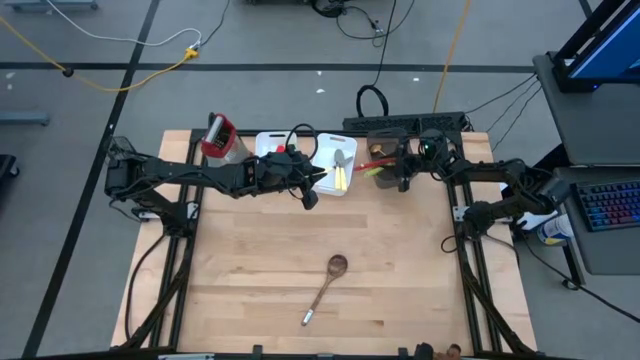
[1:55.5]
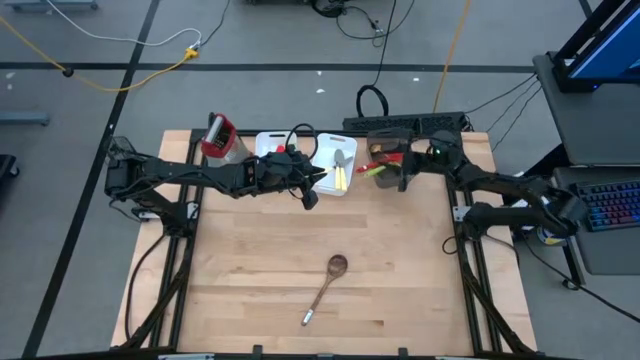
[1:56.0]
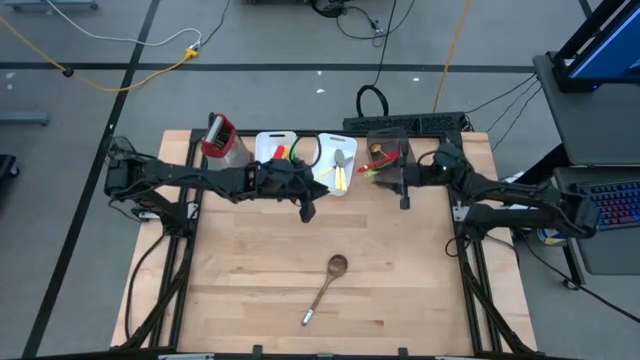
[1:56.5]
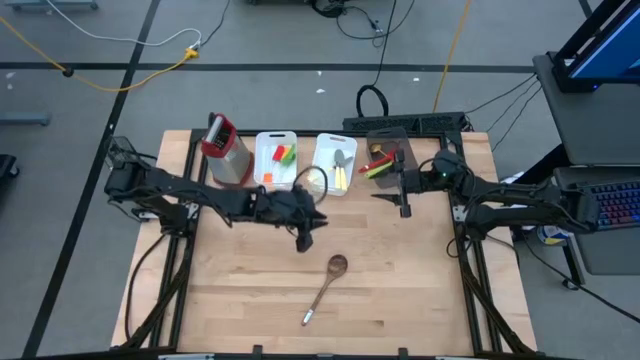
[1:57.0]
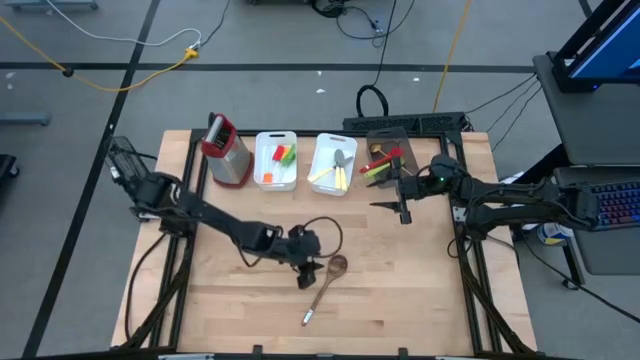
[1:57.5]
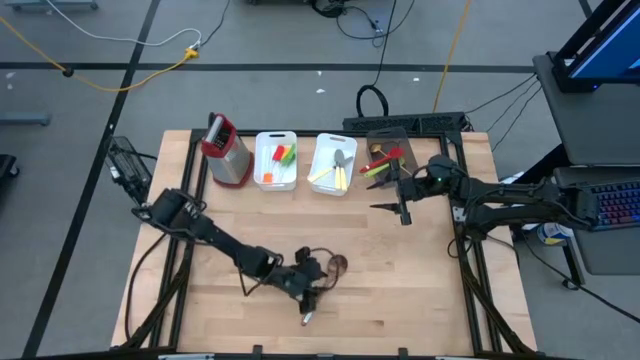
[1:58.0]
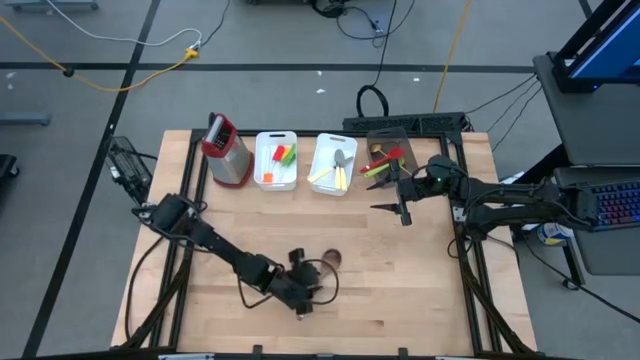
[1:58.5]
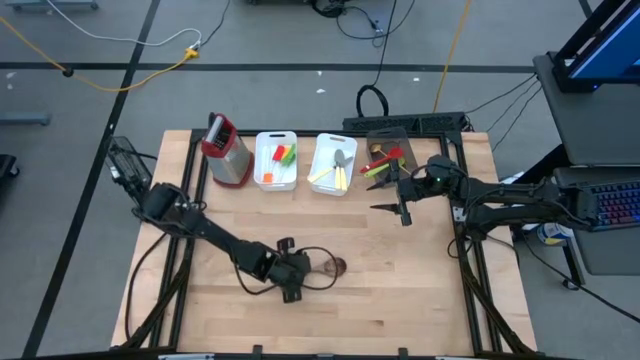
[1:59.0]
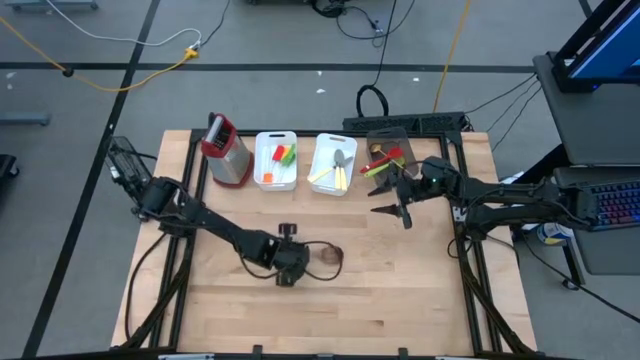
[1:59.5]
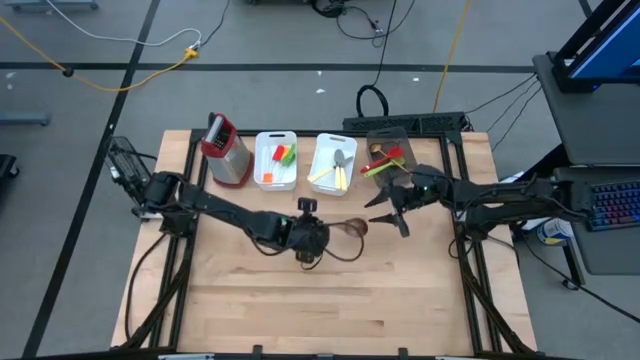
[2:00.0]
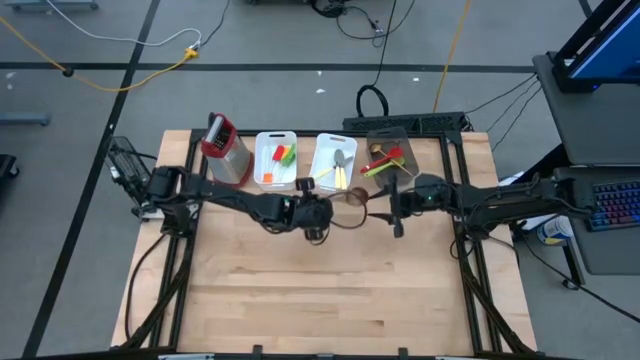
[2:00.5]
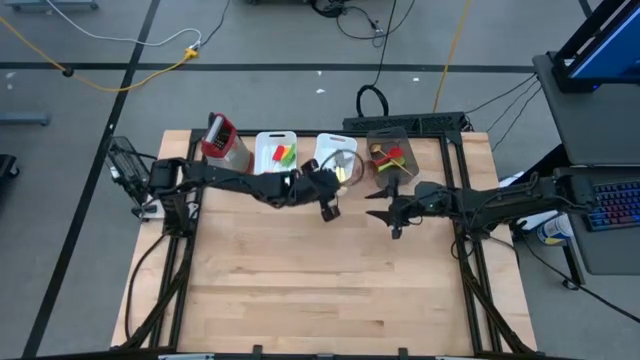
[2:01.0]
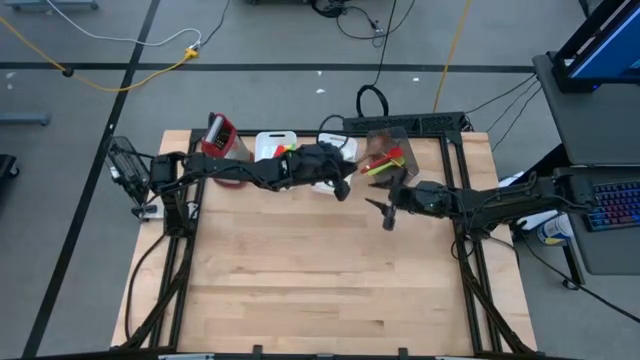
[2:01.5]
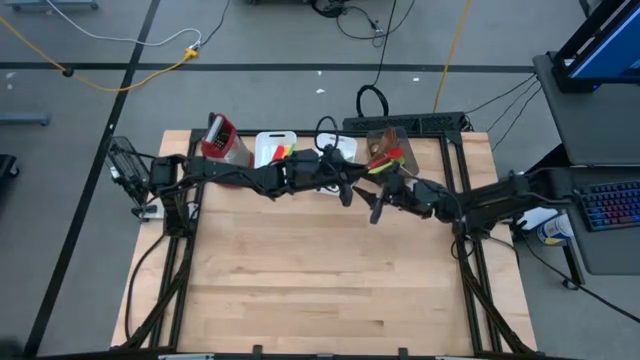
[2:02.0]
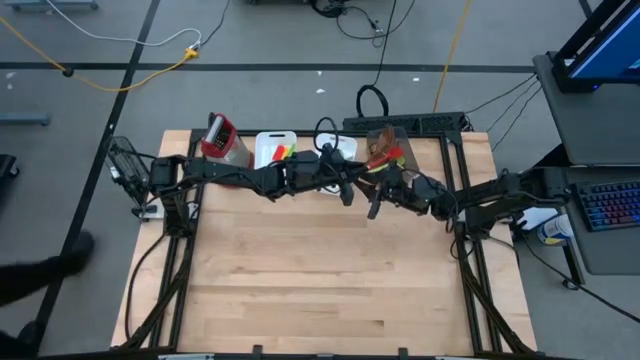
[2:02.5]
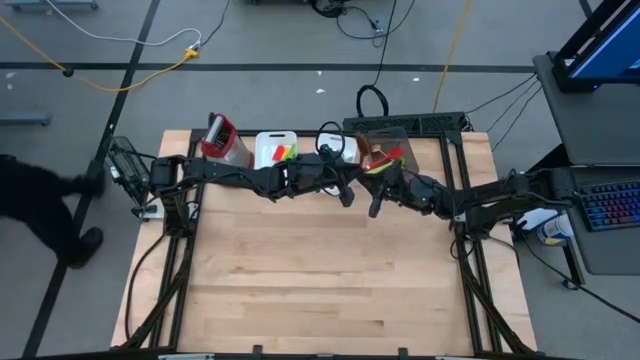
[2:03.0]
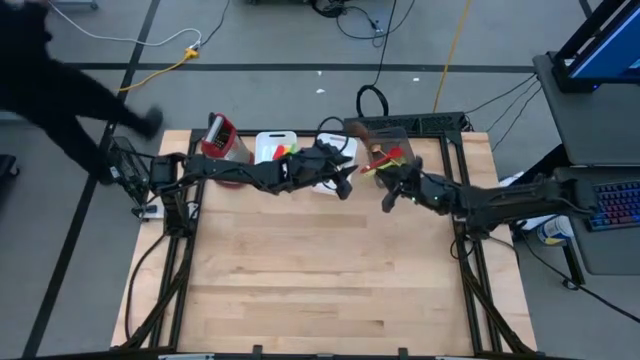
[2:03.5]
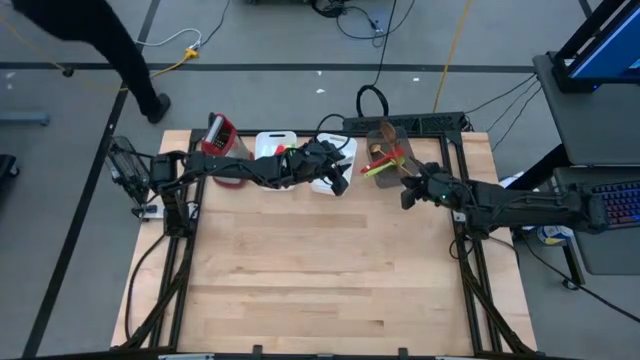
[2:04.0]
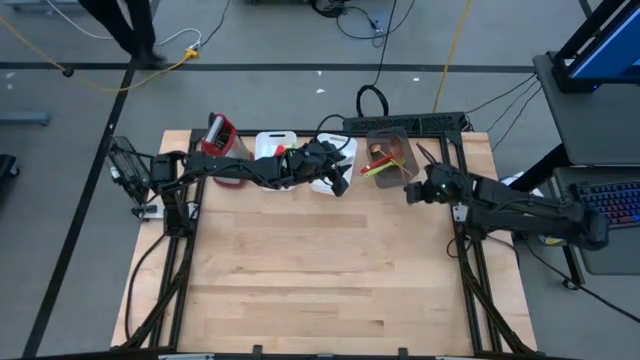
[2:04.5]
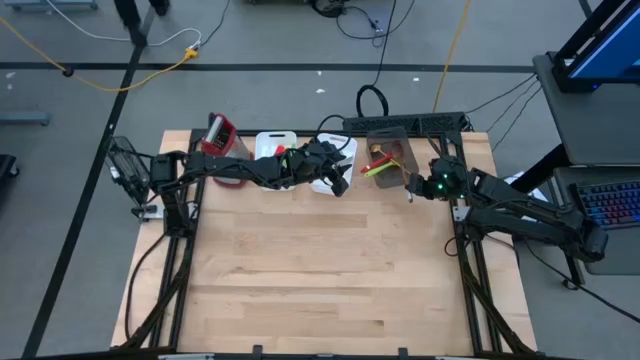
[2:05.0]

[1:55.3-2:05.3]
Task: Pick & Place Kitchen Items
Put the brown serving spoon into the black bin

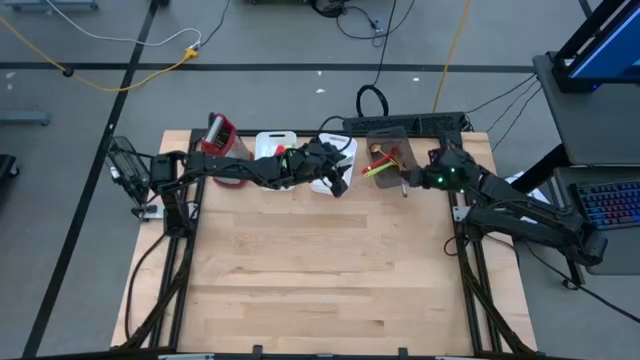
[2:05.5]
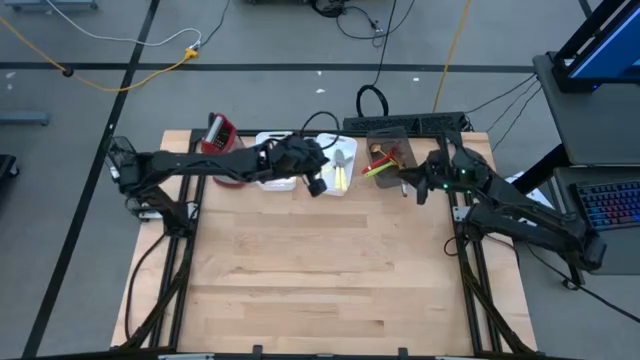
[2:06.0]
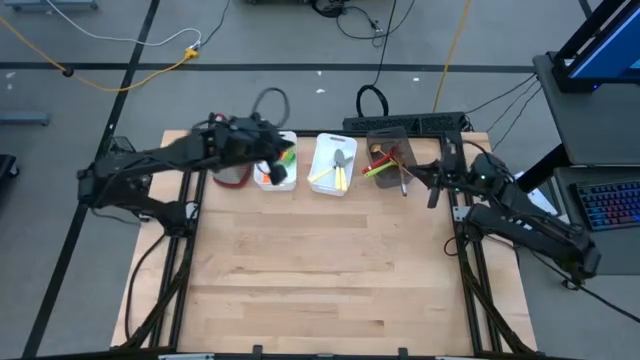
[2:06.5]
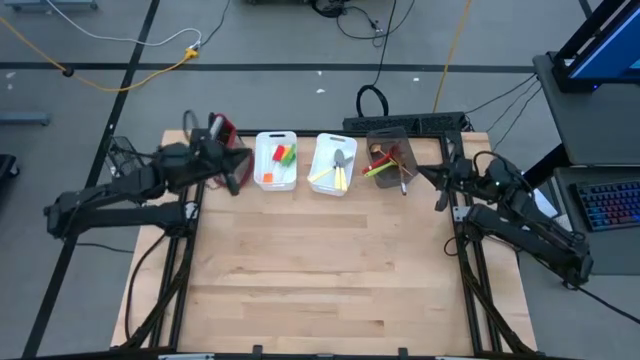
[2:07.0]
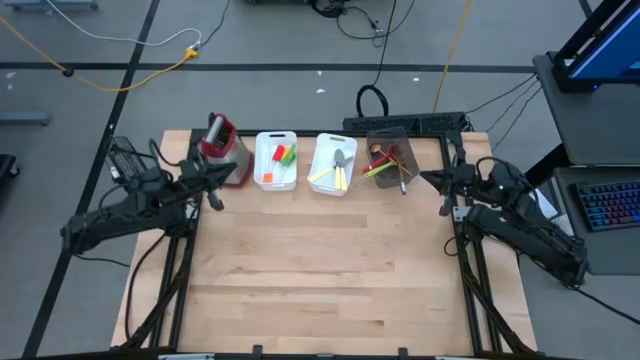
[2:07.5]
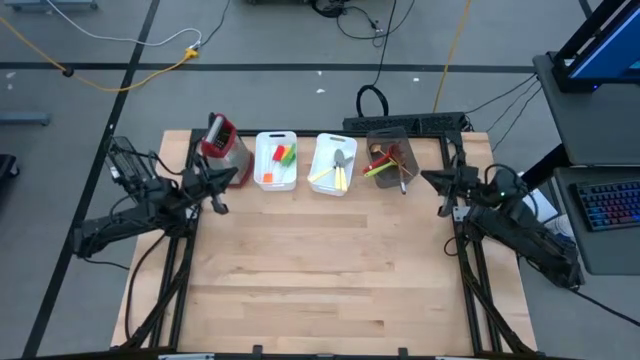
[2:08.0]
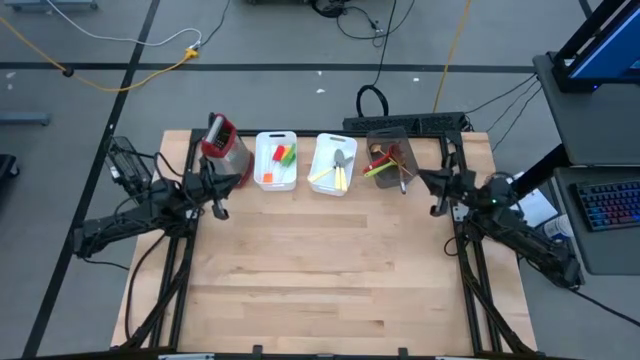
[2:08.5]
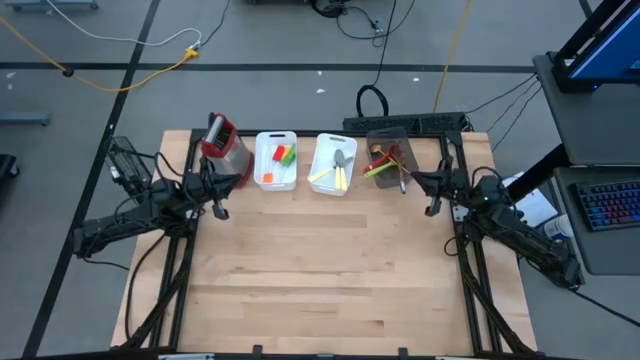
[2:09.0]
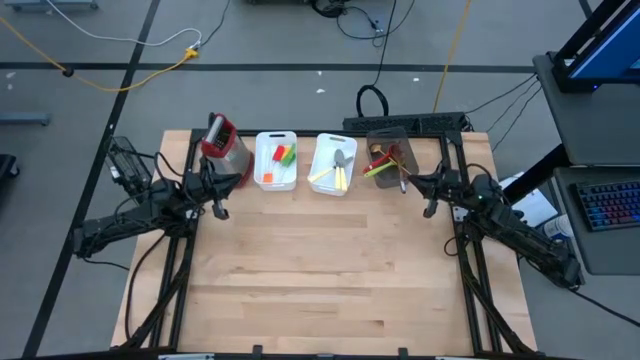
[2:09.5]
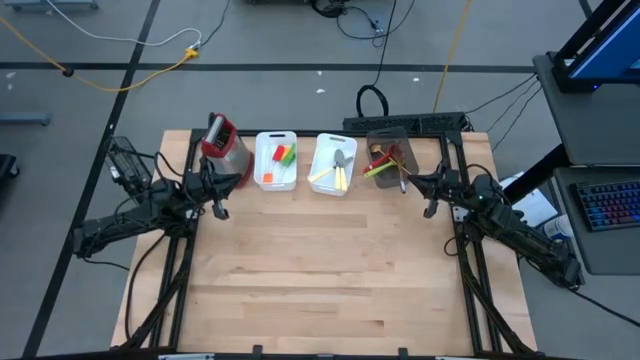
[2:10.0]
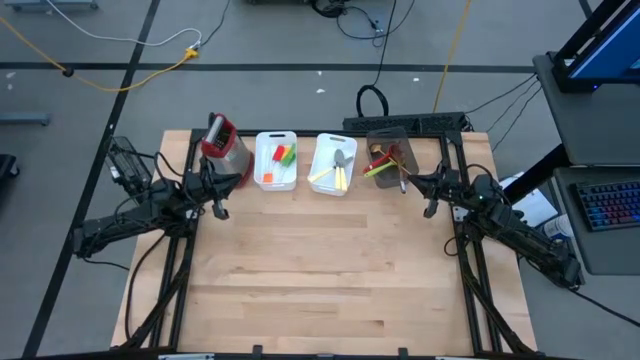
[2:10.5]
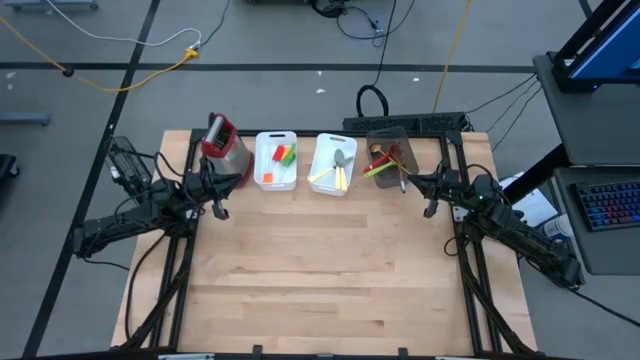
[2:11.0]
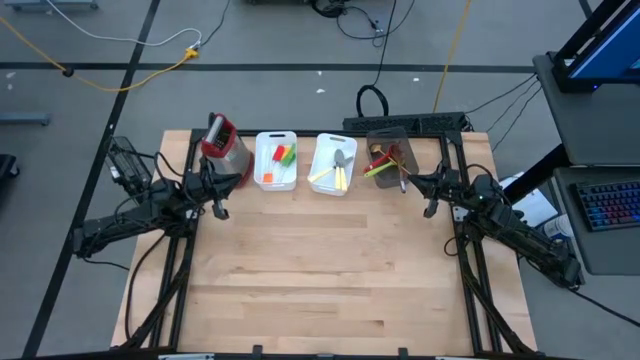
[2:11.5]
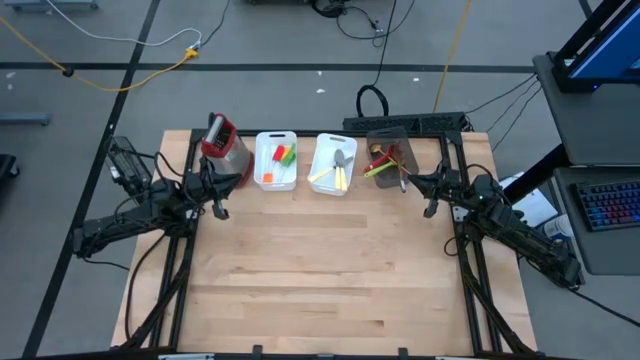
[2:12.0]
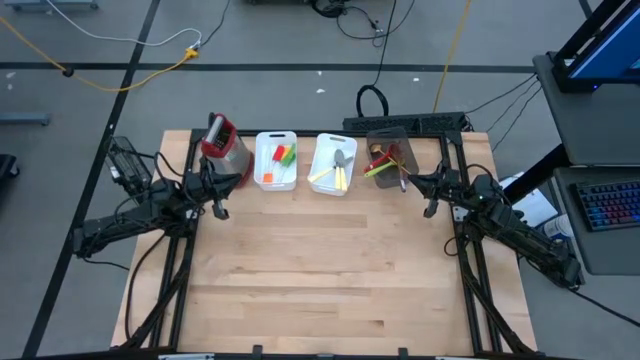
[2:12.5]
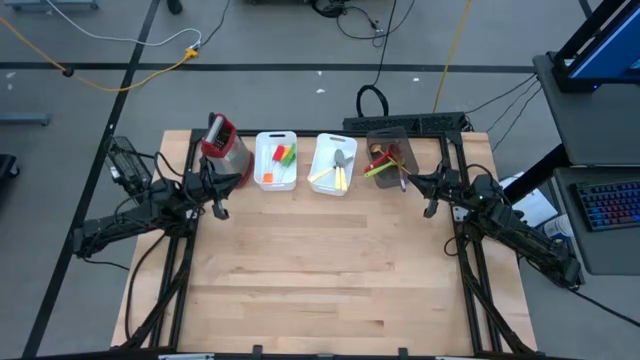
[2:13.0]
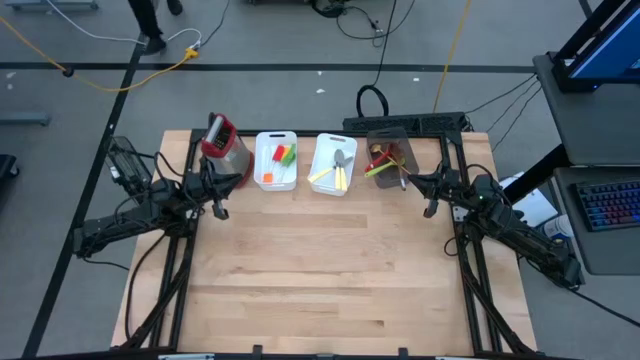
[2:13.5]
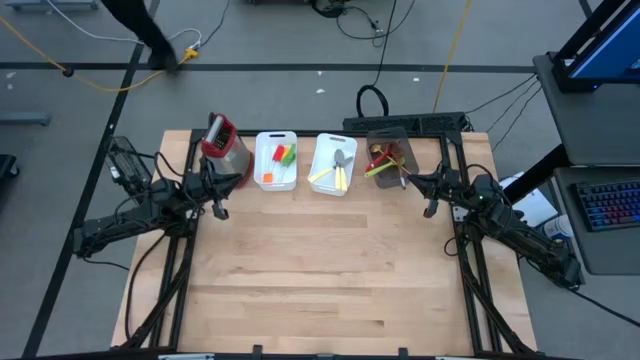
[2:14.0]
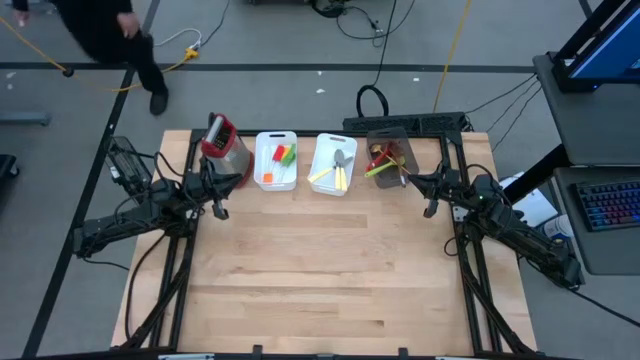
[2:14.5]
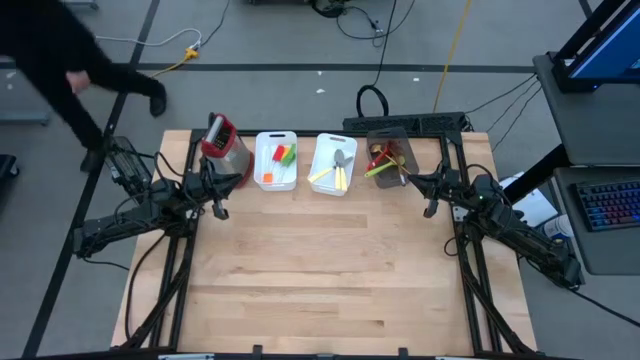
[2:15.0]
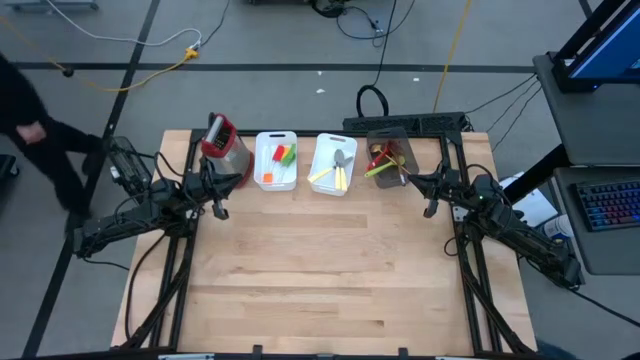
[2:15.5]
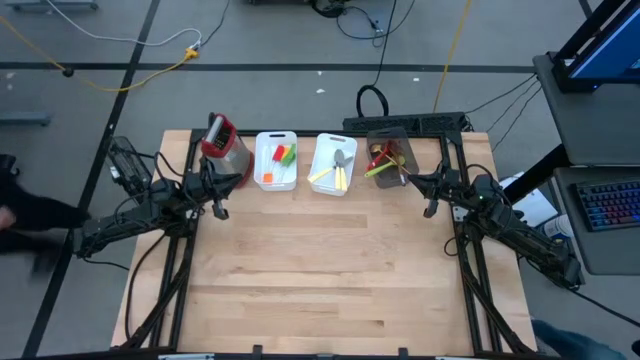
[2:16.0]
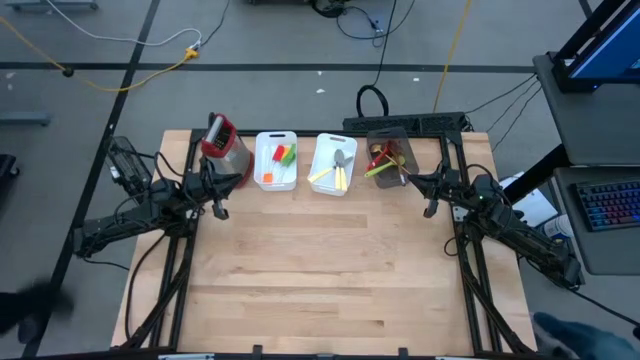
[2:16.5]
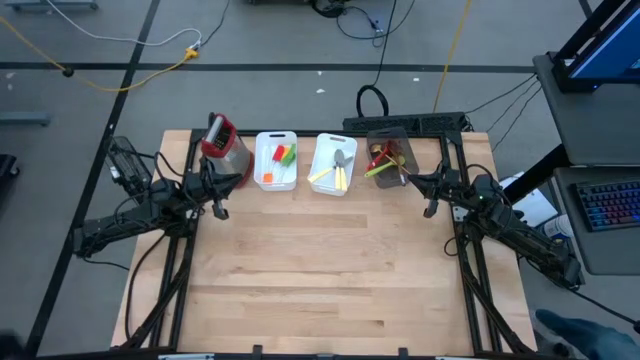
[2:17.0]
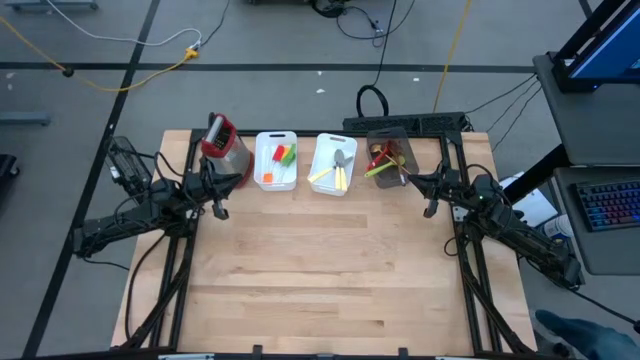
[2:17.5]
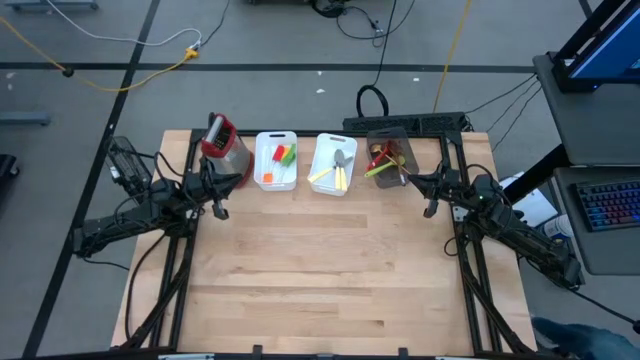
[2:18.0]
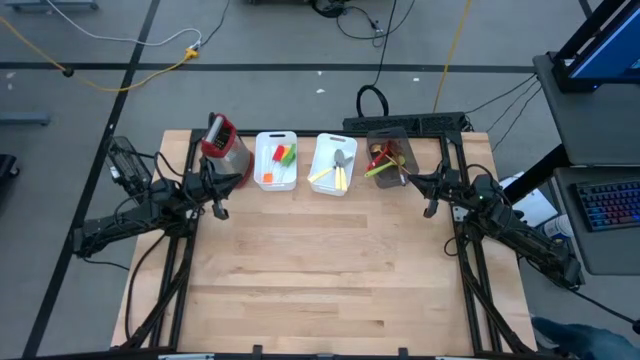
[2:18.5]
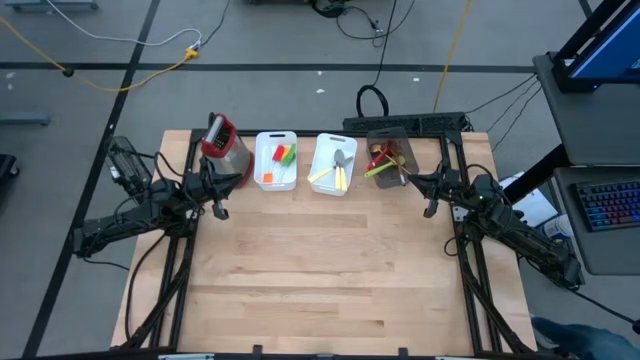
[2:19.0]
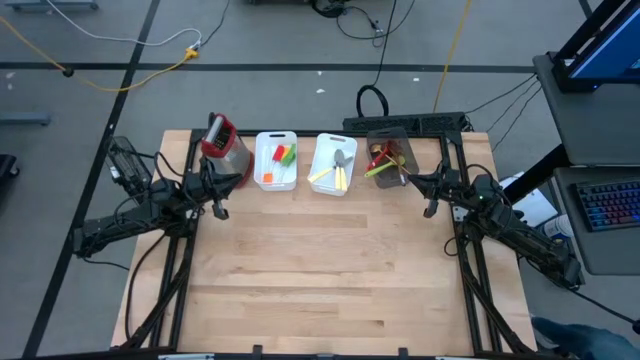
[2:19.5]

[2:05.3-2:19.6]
Return to Home Position
